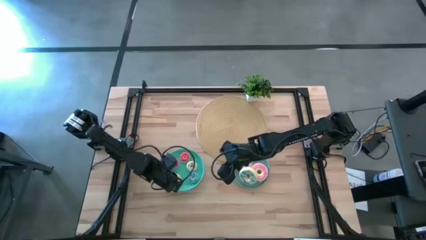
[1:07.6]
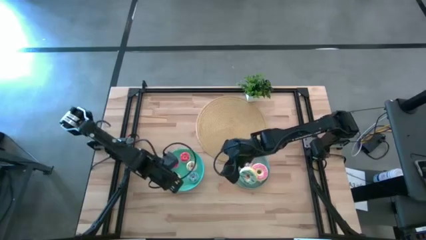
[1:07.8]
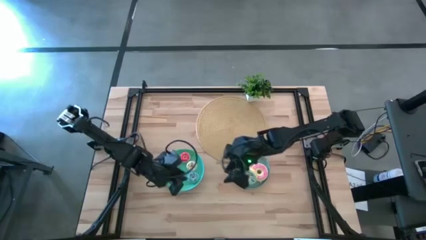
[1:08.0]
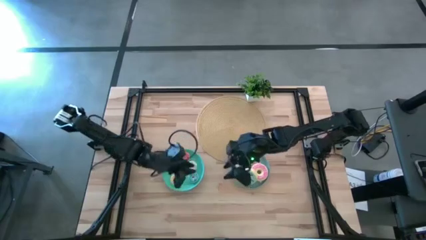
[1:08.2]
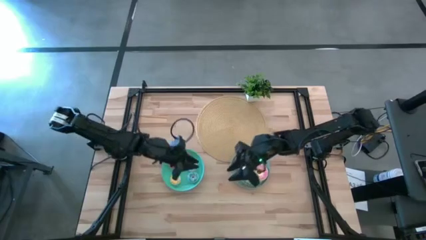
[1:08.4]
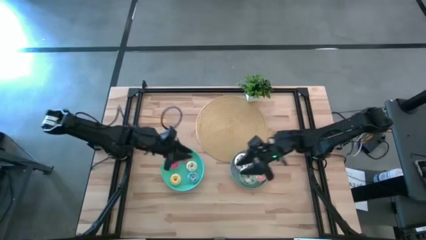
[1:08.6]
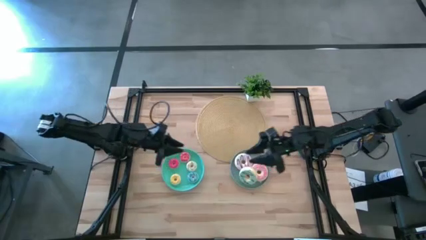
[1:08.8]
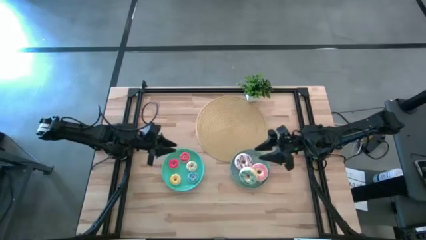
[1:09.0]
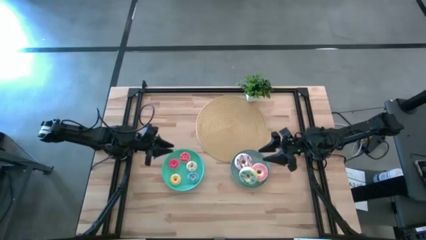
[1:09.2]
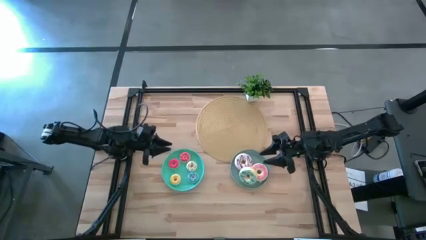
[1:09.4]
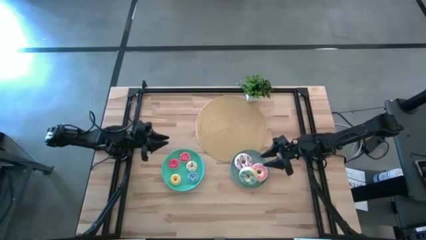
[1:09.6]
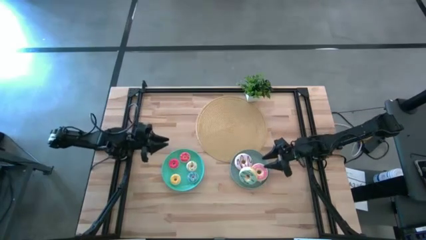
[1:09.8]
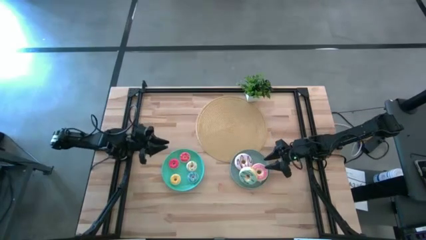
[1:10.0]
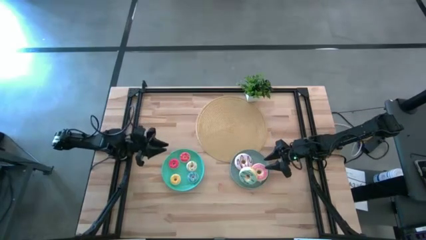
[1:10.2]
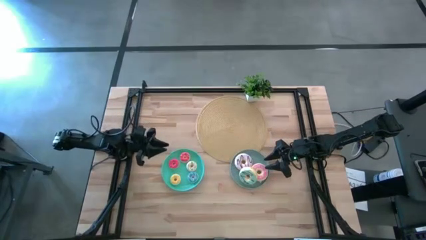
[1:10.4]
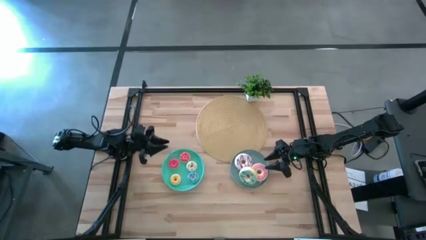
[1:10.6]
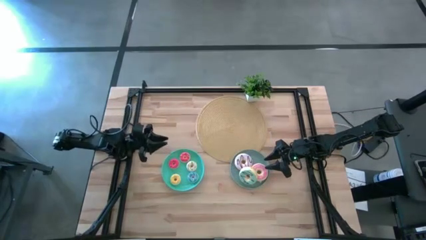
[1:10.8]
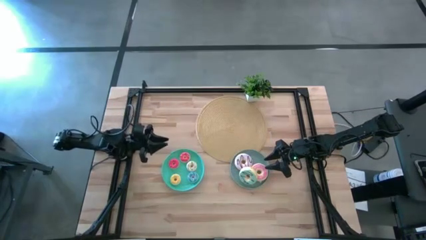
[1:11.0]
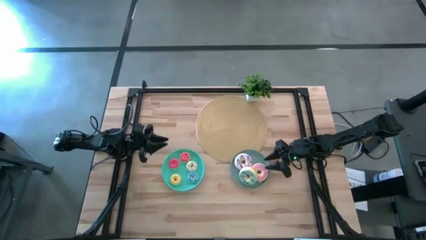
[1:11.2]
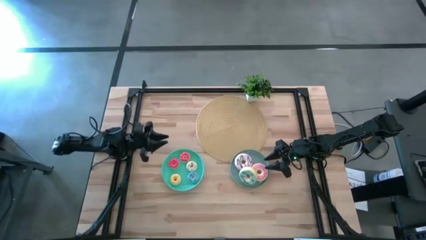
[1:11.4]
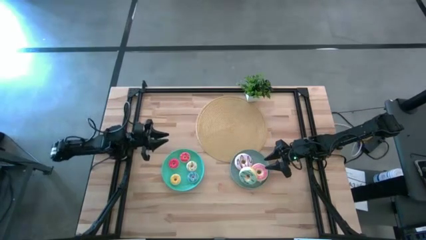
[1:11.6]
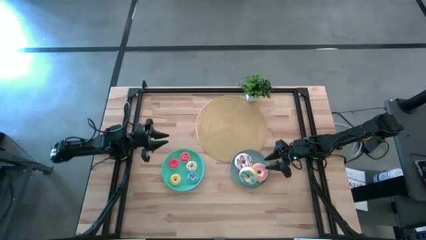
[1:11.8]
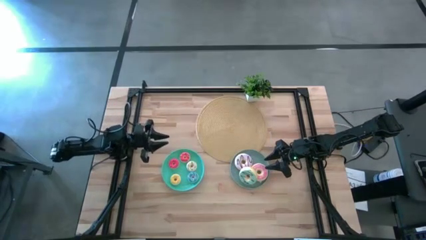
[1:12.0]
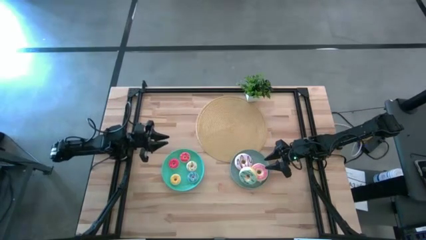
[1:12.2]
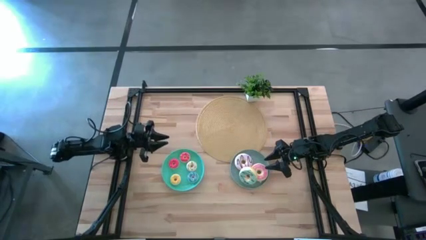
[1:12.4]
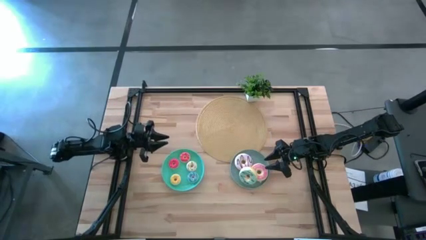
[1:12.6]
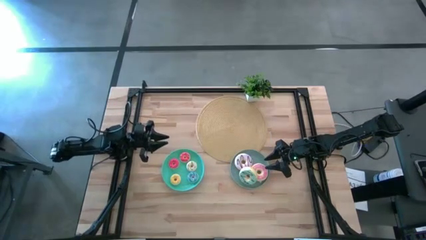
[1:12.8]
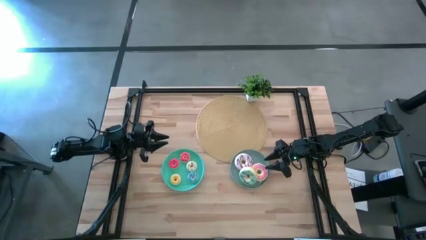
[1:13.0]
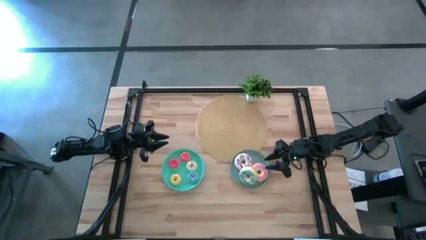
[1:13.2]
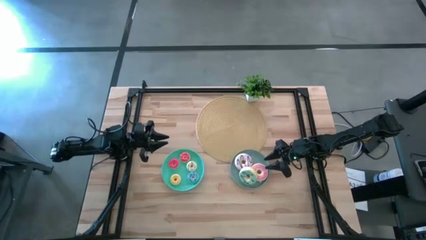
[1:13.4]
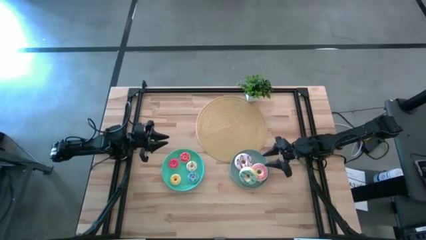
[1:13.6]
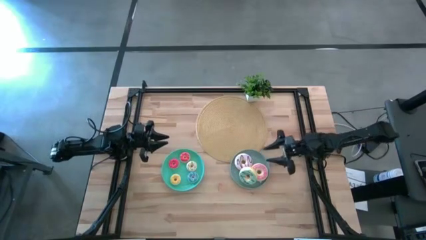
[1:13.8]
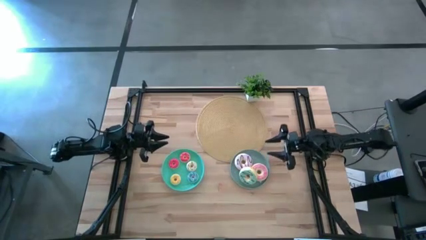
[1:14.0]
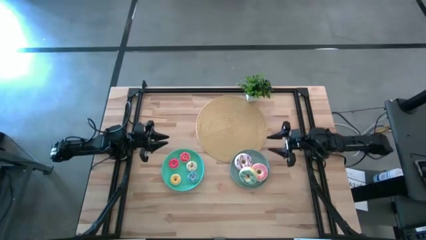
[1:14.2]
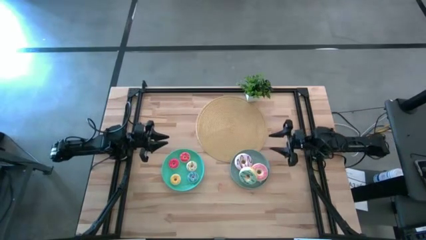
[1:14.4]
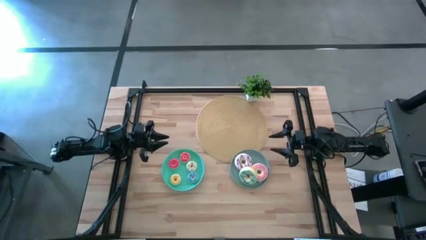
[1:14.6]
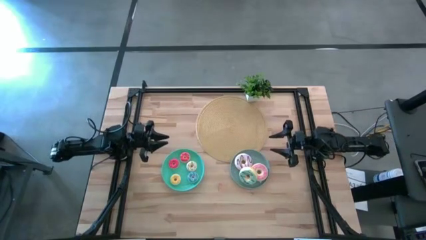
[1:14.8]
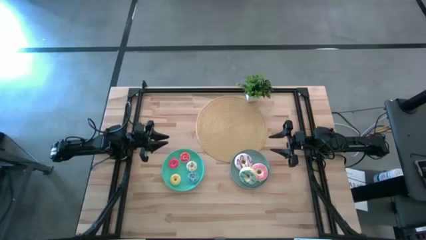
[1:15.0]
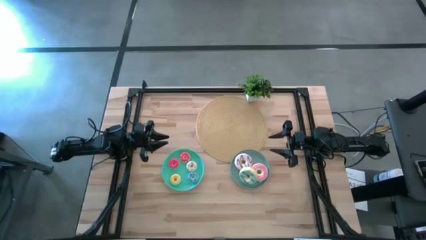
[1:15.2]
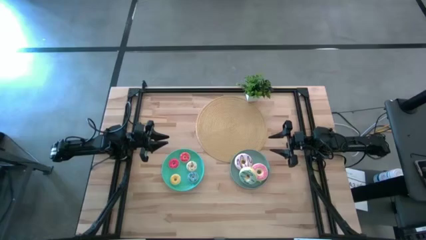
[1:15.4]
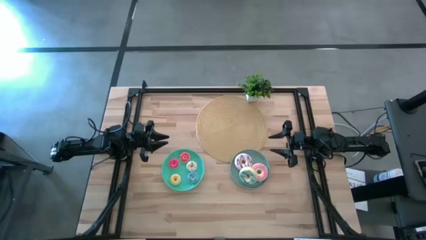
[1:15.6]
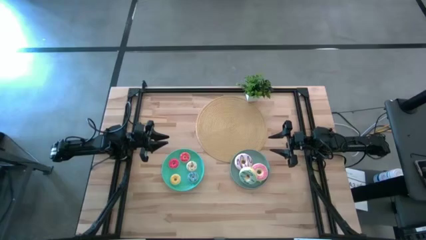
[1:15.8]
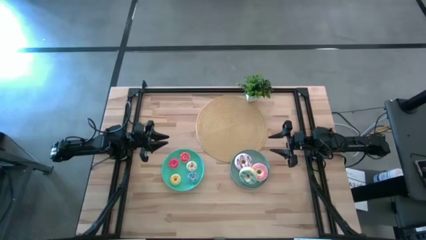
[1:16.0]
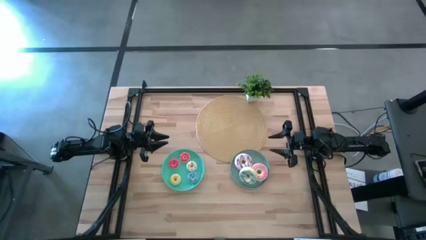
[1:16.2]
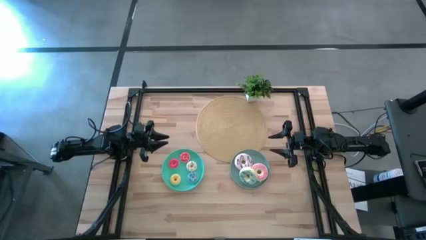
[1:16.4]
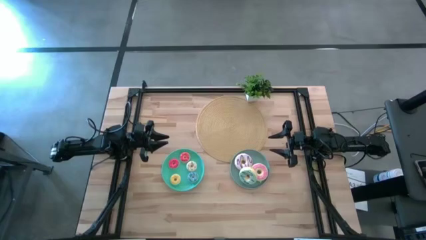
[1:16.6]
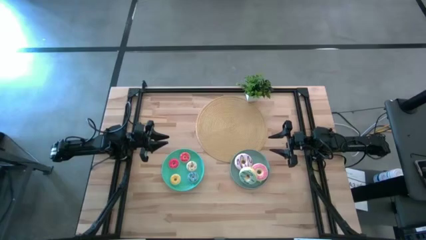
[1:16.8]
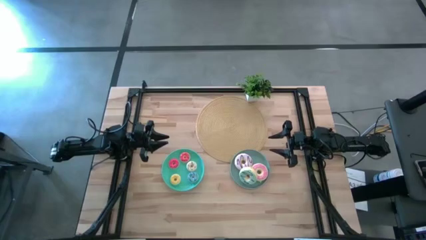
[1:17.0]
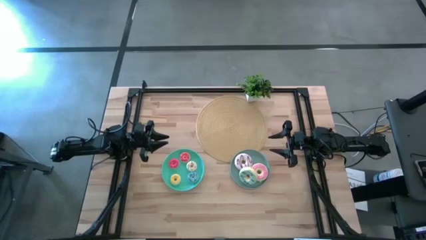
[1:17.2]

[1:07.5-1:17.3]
Task: Pick & Place donuts
Return to Home Position

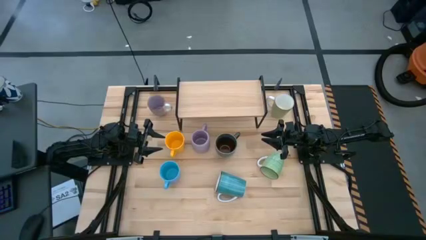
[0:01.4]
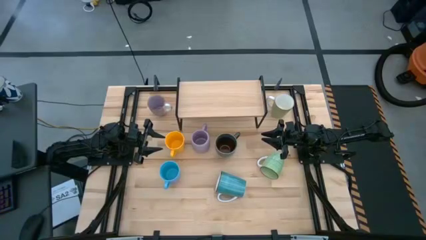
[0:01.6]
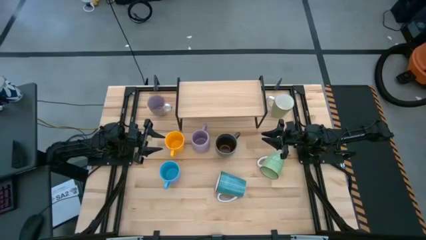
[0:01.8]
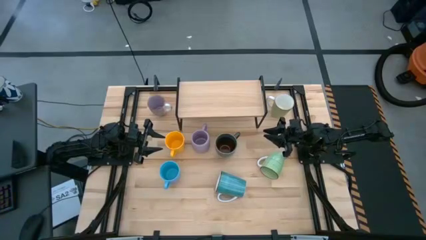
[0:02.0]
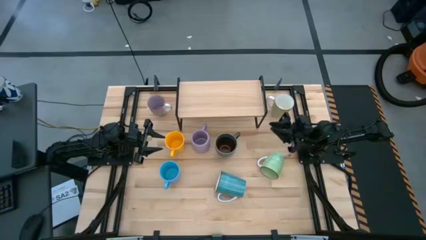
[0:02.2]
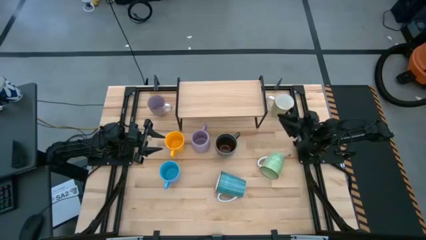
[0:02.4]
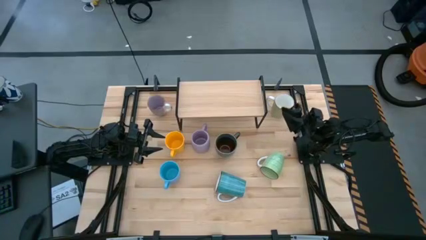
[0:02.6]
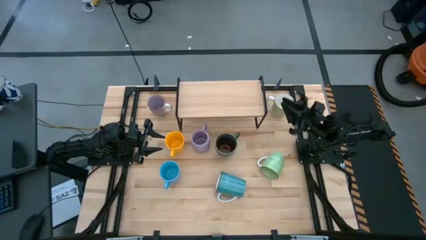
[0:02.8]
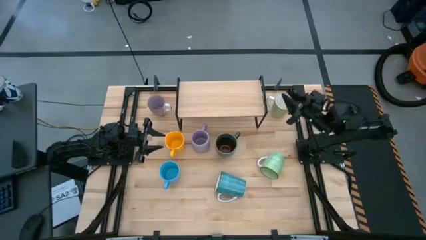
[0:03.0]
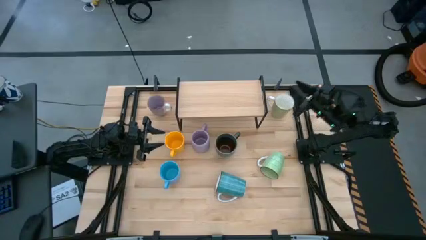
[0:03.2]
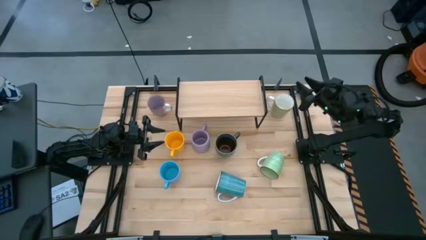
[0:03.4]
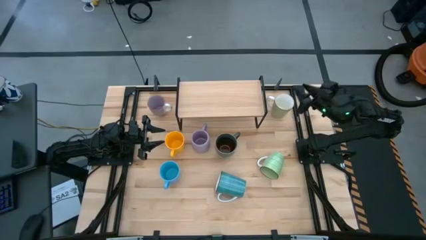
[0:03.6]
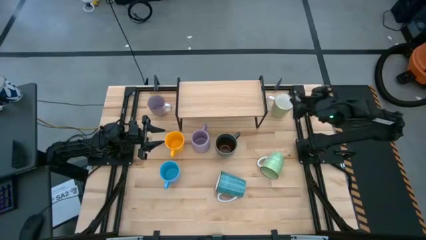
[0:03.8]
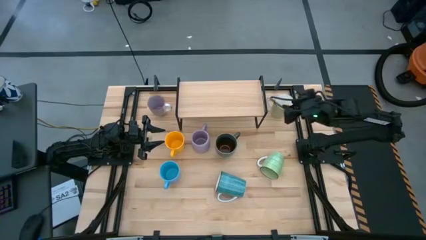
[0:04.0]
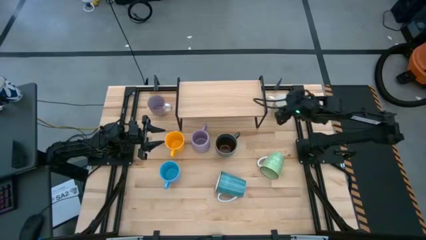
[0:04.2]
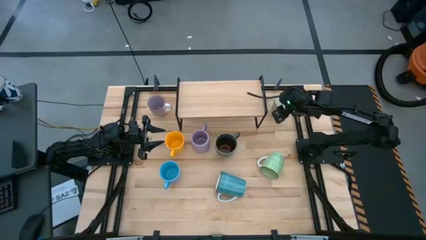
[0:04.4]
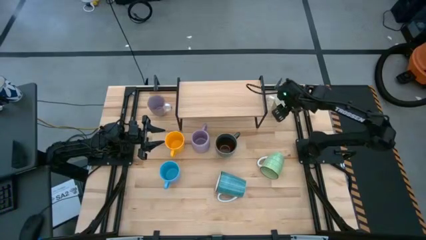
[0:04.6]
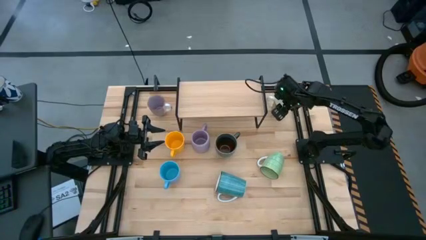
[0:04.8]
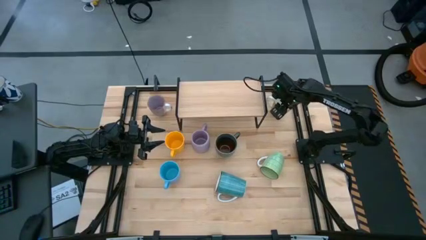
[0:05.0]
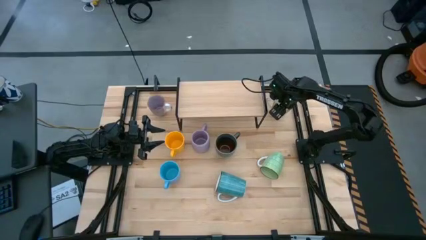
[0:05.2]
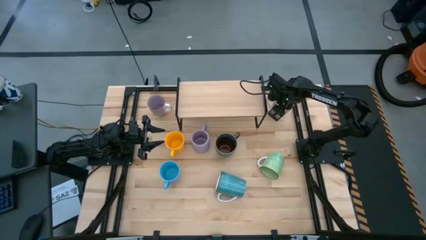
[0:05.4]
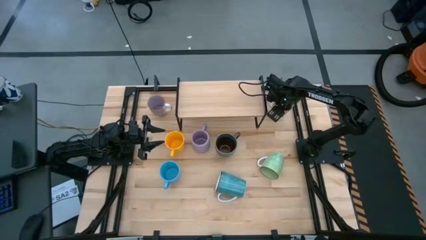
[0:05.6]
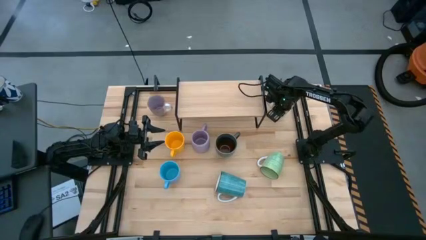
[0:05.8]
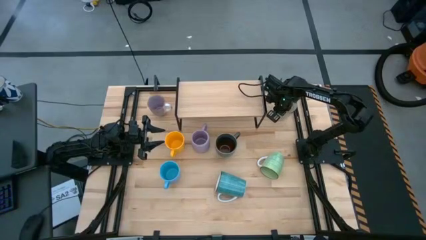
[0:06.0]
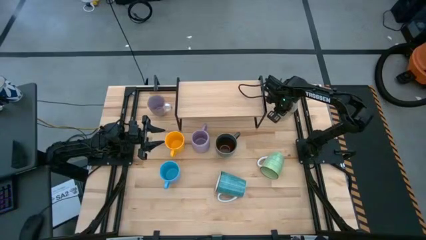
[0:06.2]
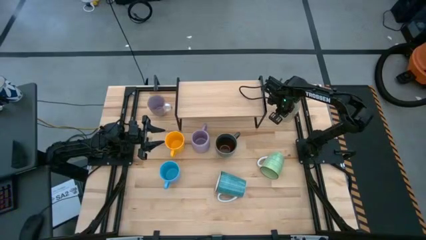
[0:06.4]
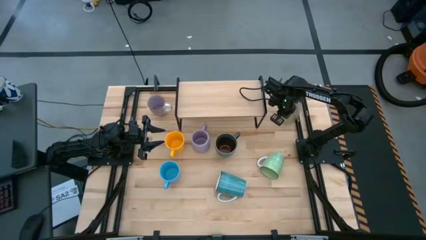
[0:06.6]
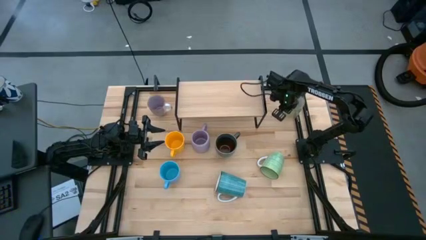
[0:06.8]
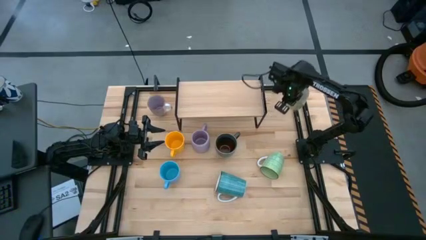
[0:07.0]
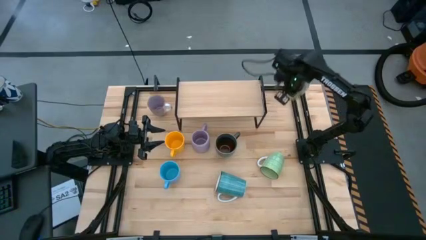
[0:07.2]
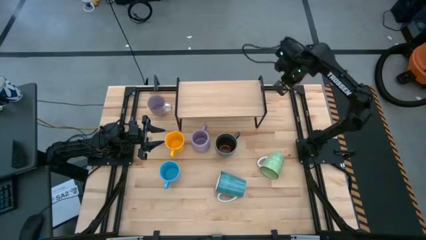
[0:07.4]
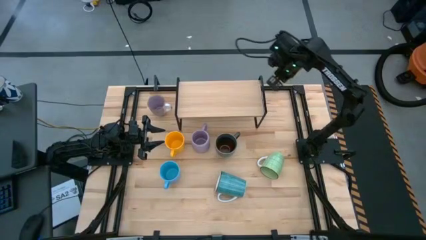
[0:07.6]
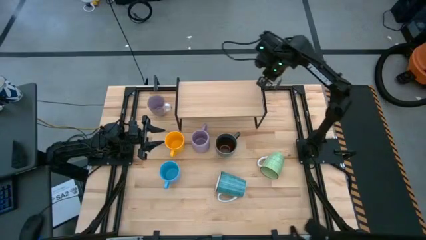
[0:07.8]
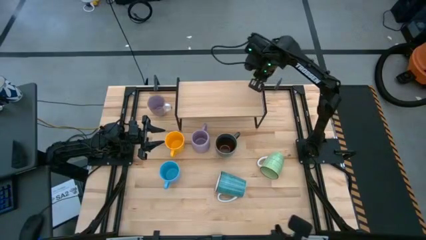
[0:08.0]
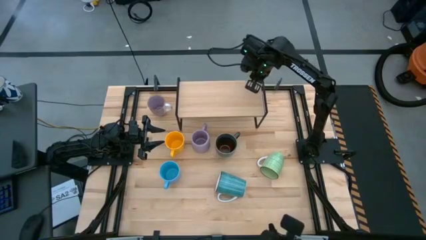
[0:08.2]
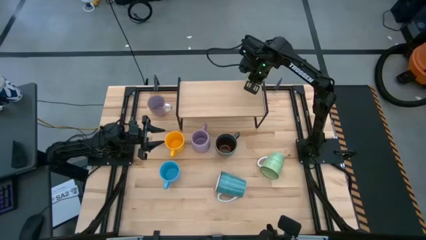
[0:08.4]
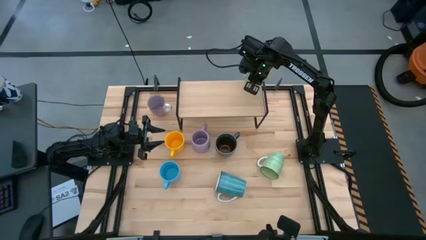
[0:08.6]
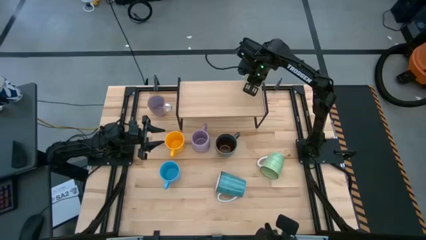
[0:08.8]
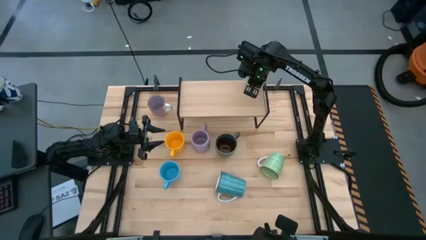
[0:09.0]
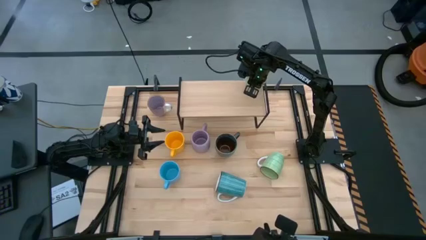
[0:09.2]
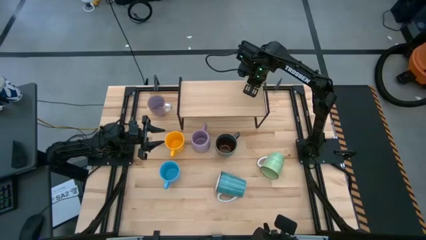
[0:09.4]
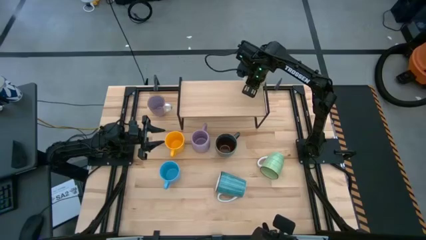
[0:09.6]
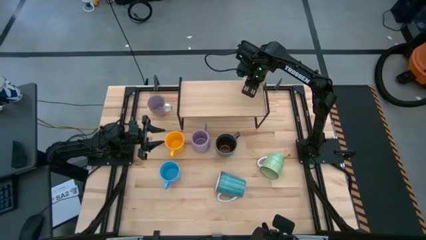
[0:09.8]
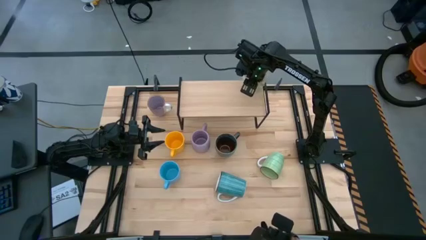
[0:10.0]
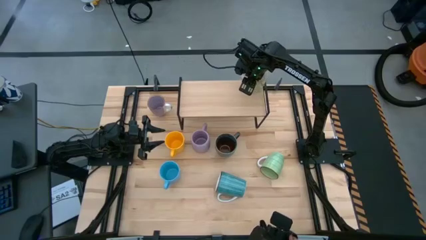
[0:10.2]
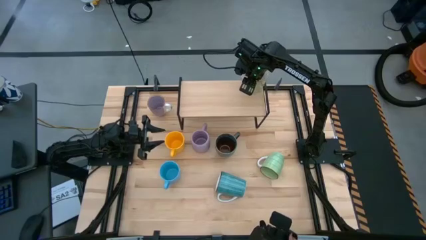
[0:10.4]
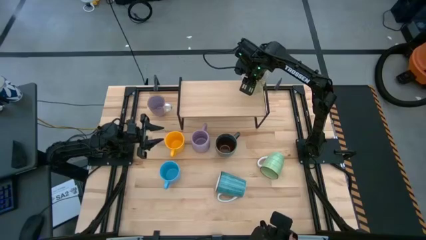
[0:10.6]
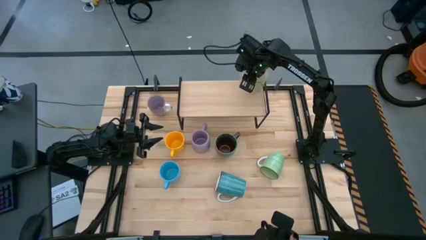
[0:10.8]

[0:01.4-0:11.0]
Task: Place coffee mugs
Put the white mug on the shelf
